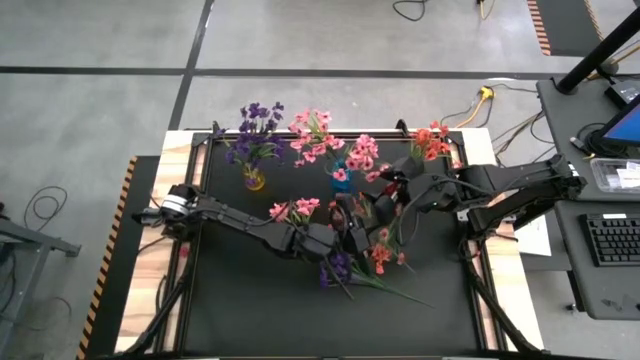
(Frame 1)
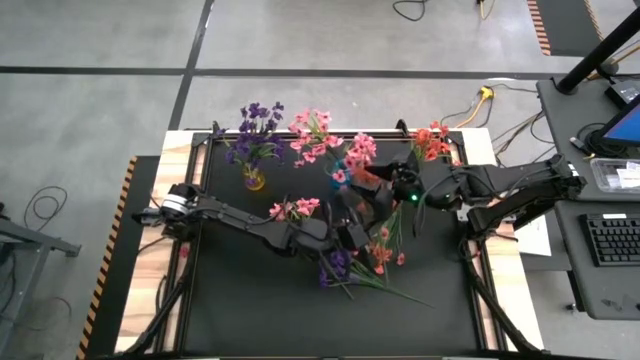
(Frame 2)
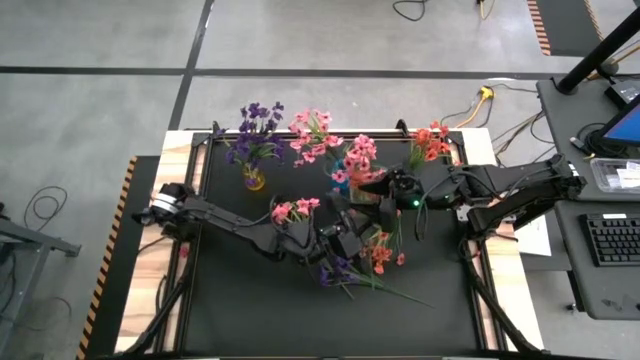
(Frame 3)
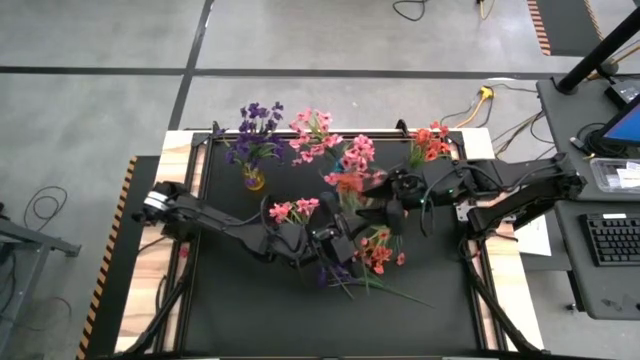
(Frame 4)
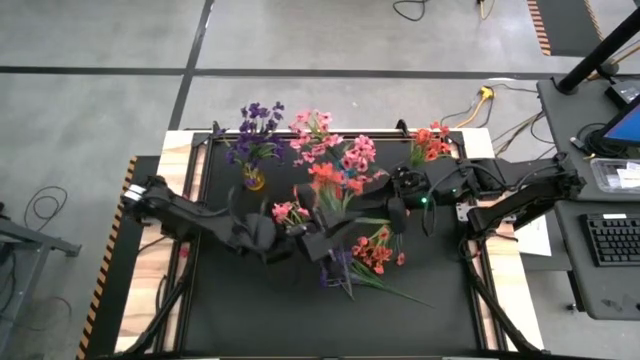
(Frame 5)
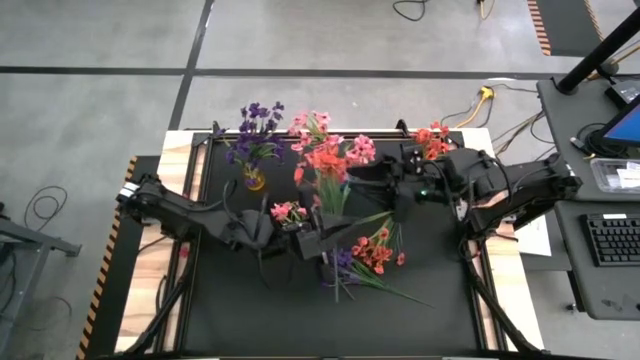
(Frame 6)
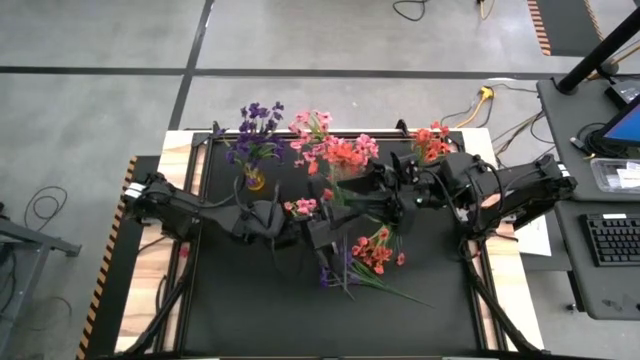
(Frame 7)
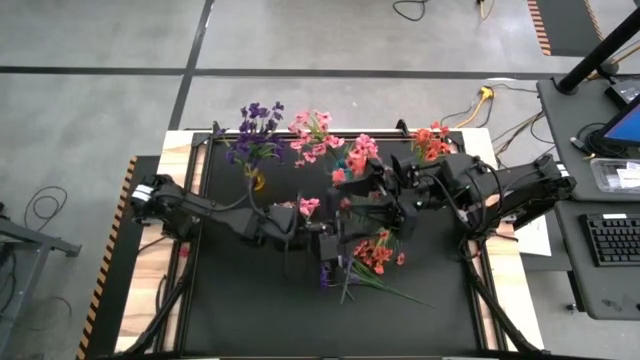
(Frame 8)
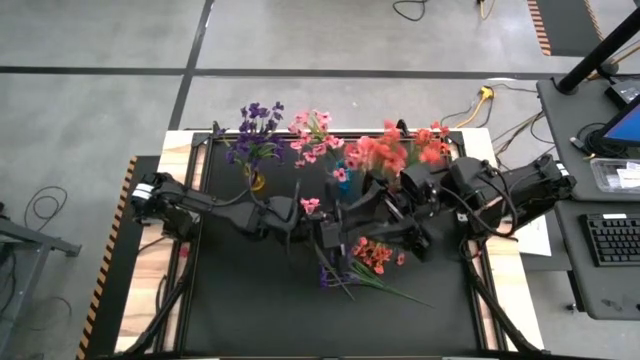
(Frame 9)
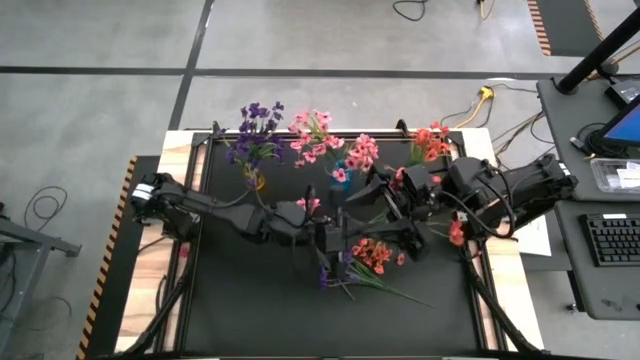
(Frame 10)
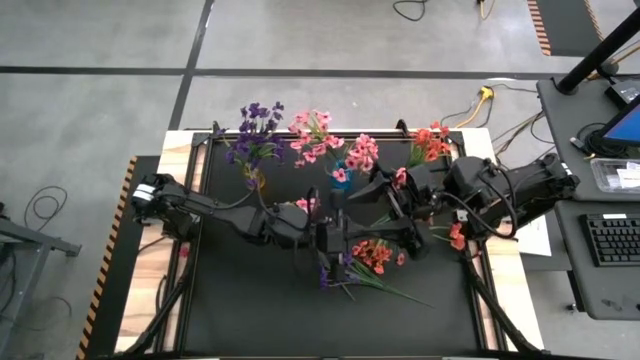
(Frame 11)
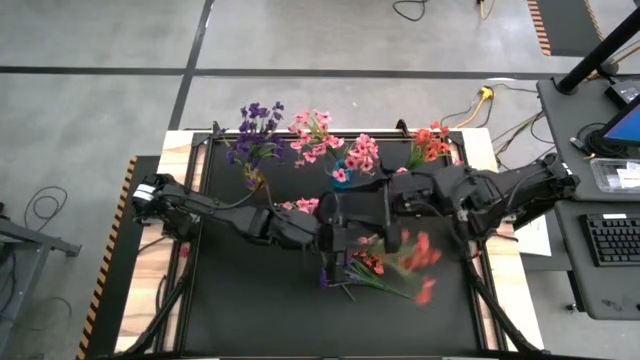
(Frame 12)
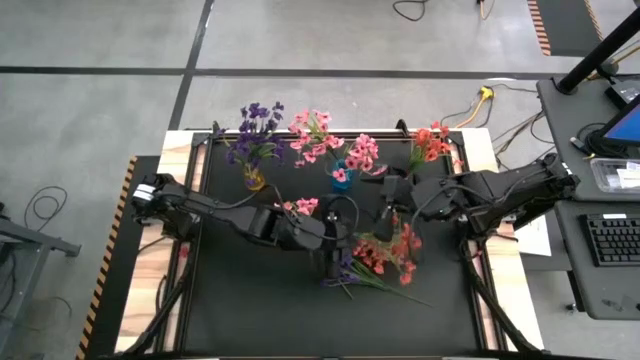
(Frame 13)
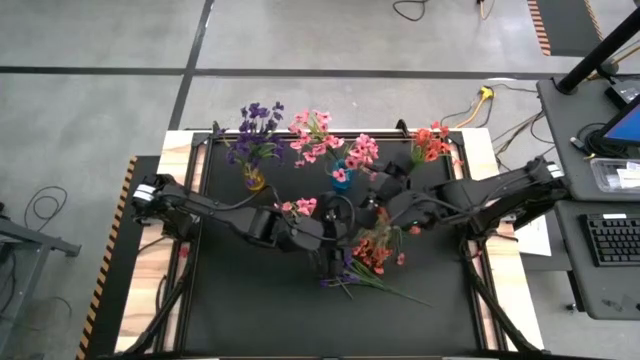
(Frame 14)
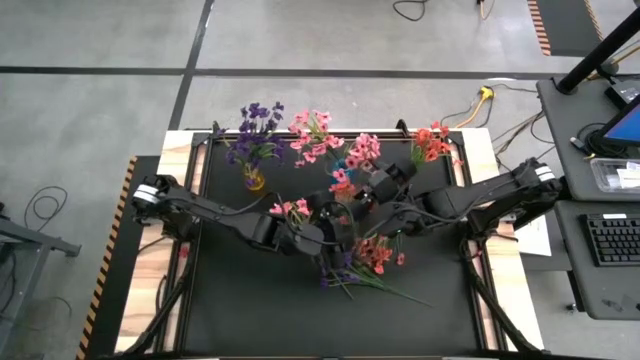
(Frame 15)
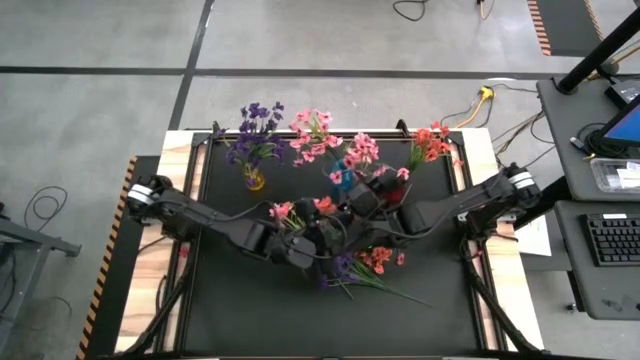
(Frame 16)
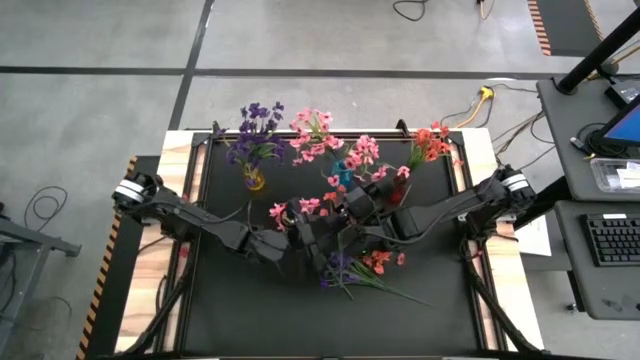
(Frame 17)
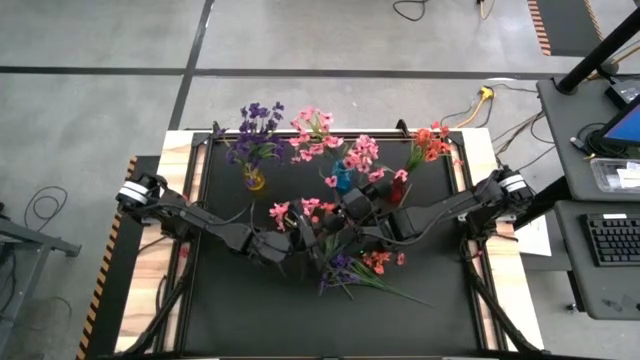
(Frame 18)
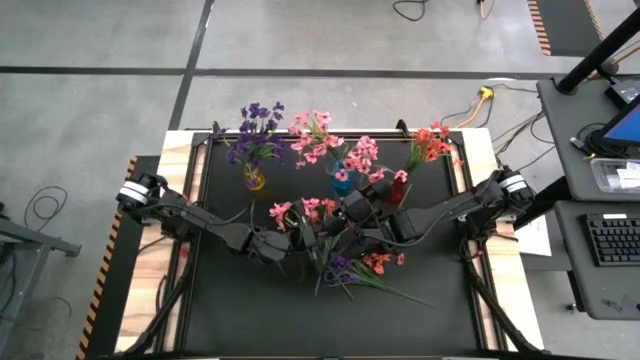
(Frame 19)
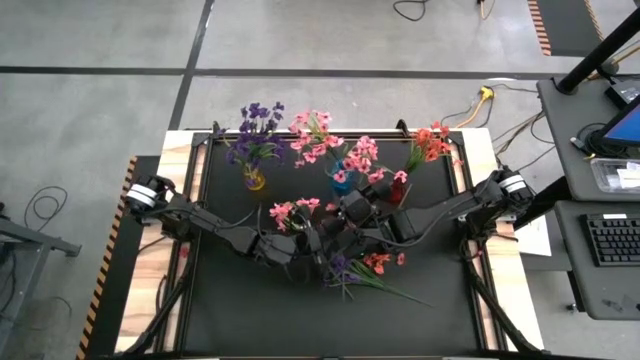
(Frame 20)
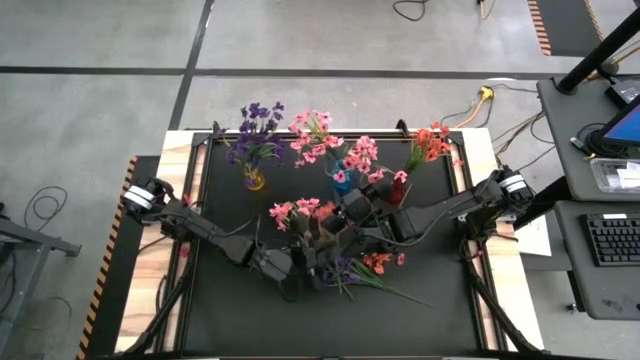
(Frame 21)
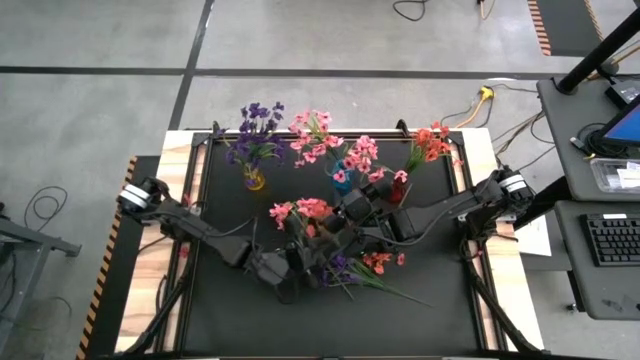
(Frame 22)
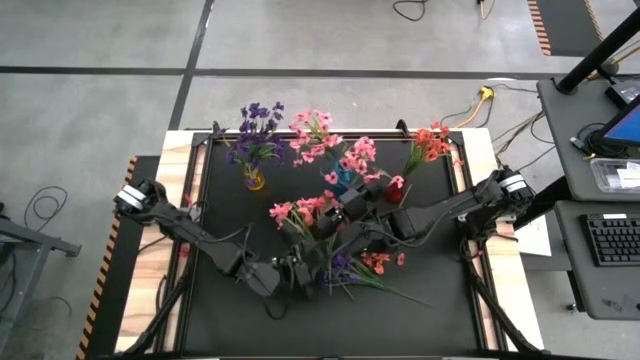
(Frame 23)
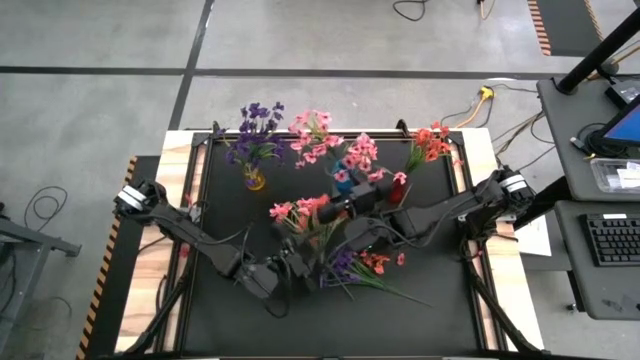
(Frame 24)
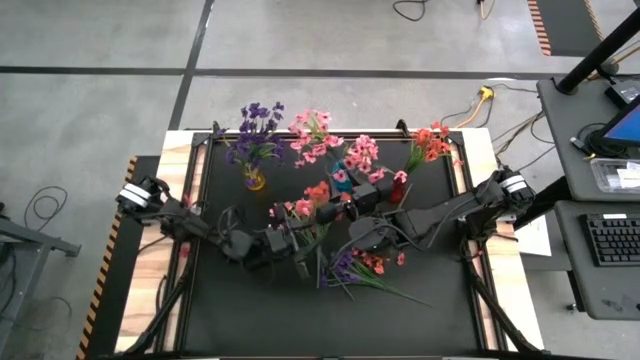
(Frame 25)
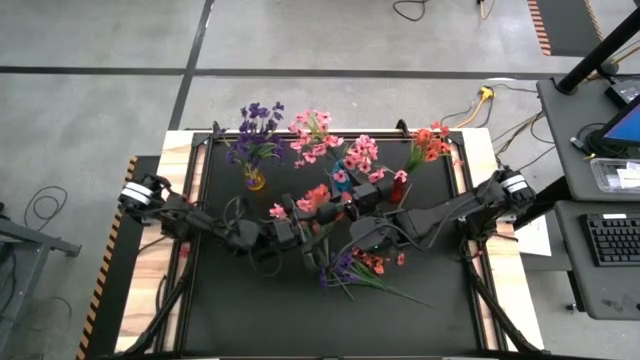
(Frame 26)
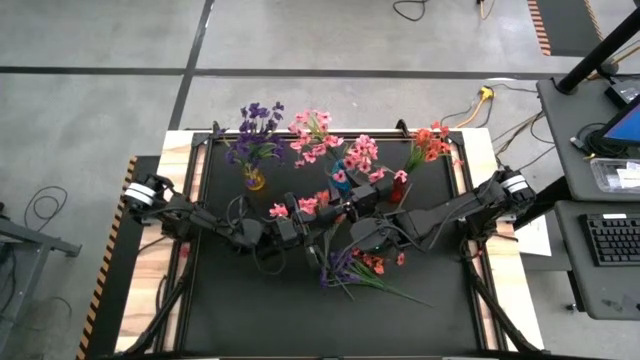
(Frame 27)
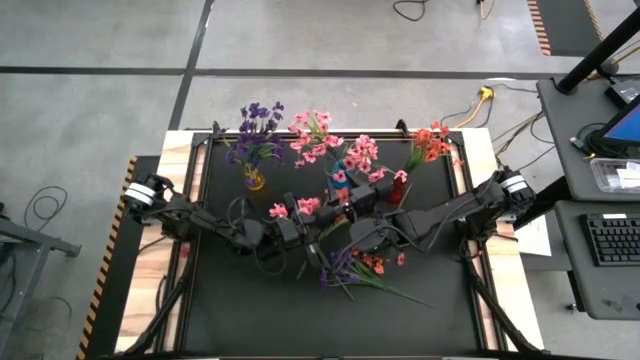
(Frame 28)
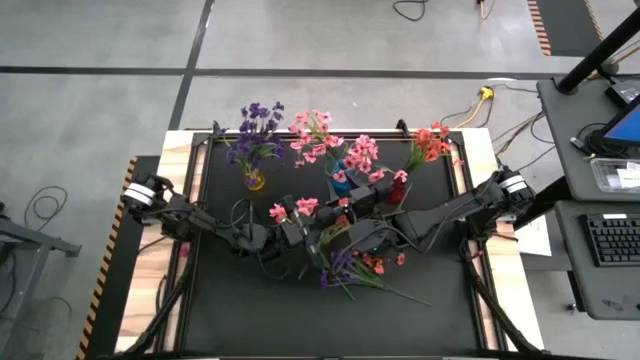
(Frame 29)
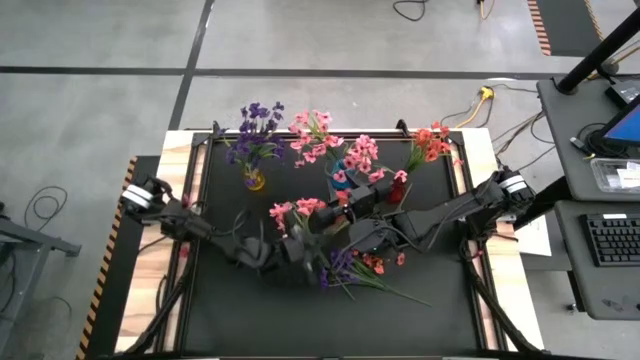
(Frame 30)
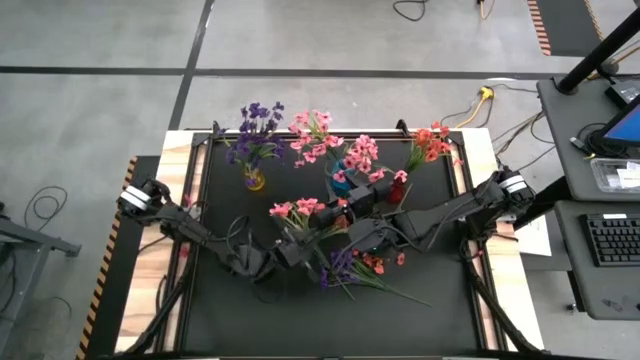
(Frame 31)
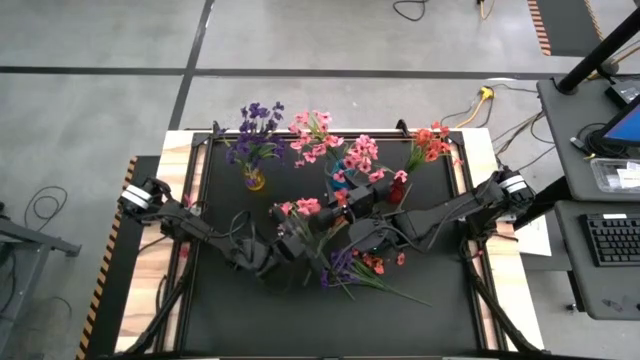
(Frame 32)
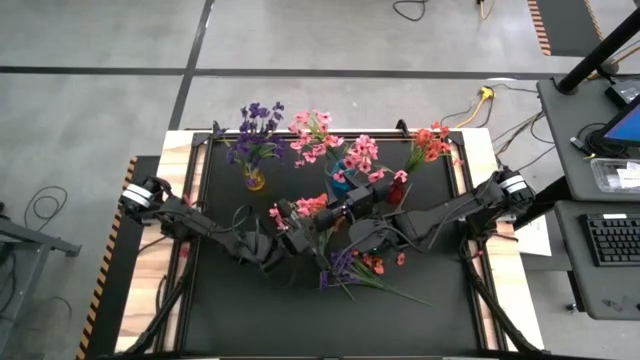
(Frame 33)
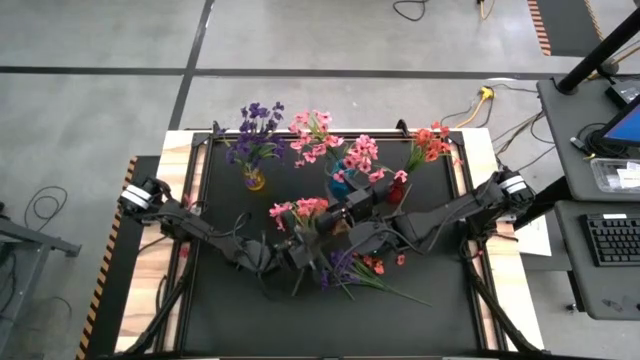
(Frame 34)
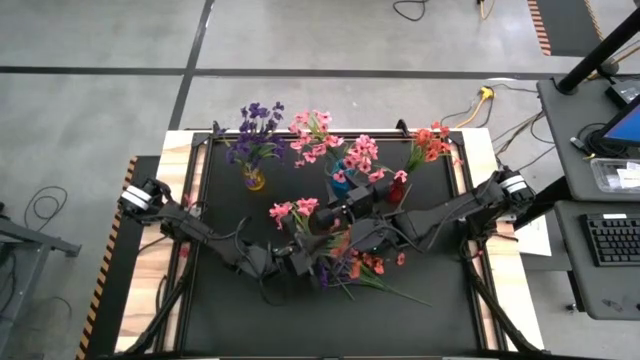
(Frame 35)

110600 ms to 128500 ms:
Task: Sort flowers into vase by color
Put the orange flower into the red vase

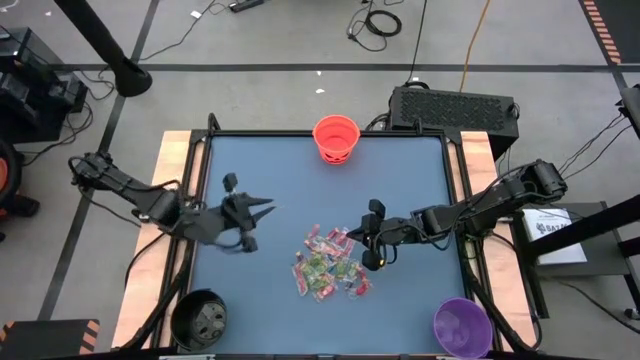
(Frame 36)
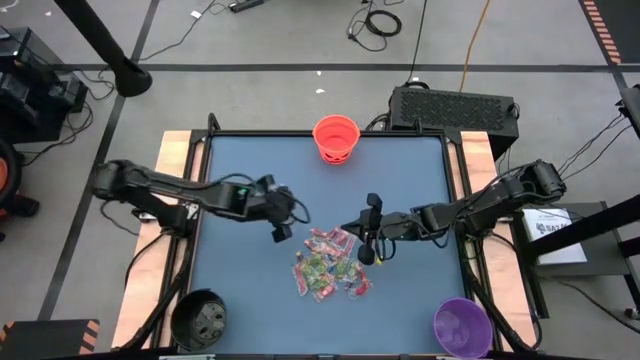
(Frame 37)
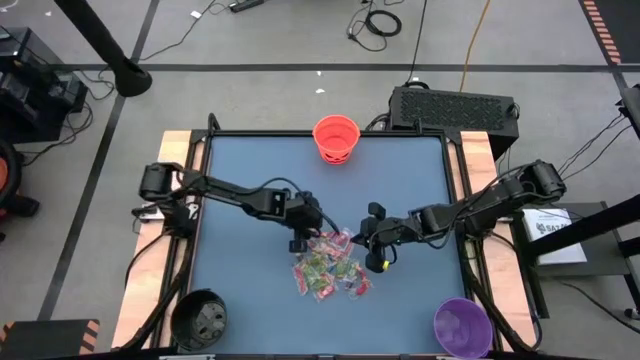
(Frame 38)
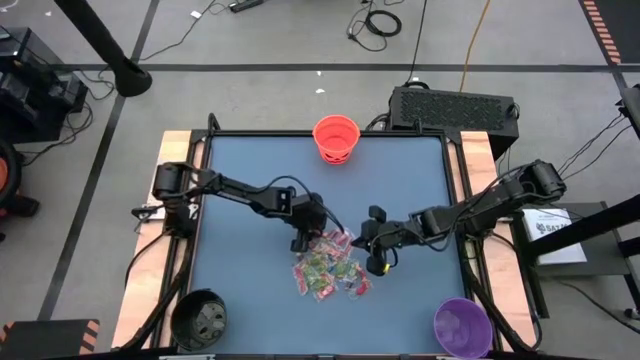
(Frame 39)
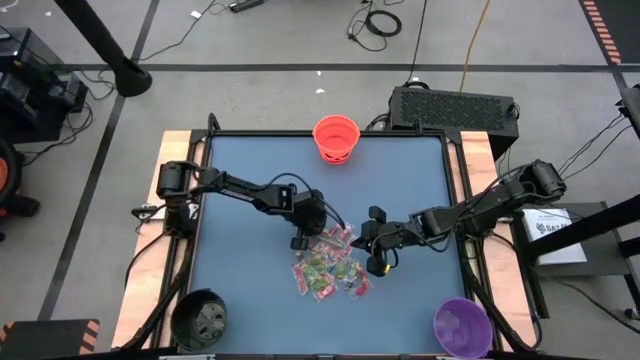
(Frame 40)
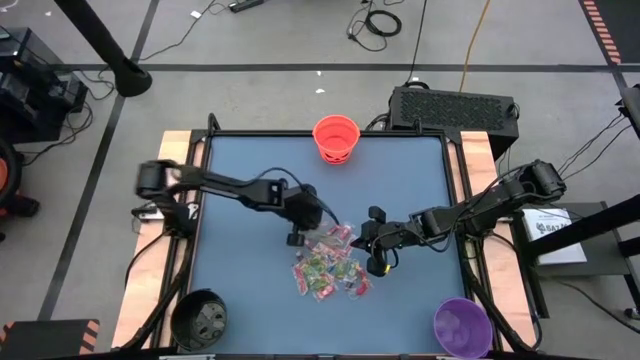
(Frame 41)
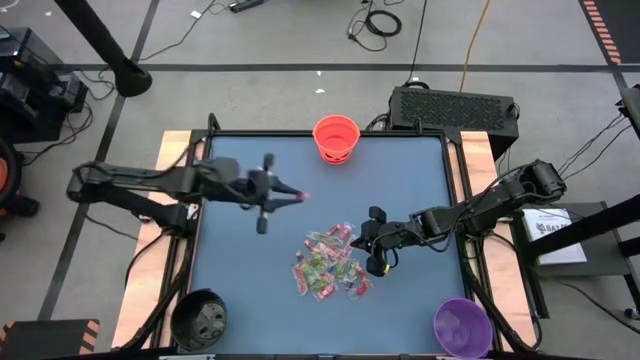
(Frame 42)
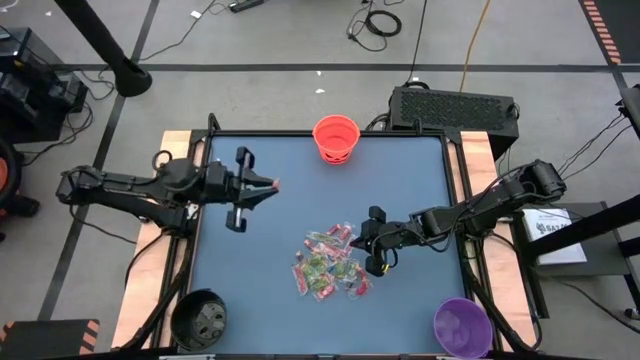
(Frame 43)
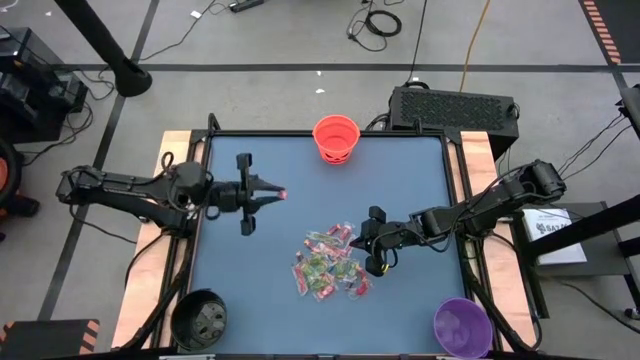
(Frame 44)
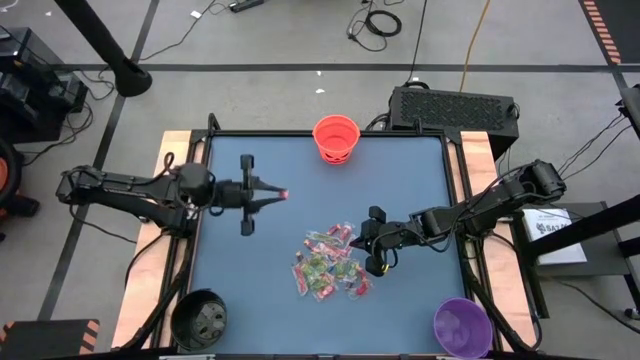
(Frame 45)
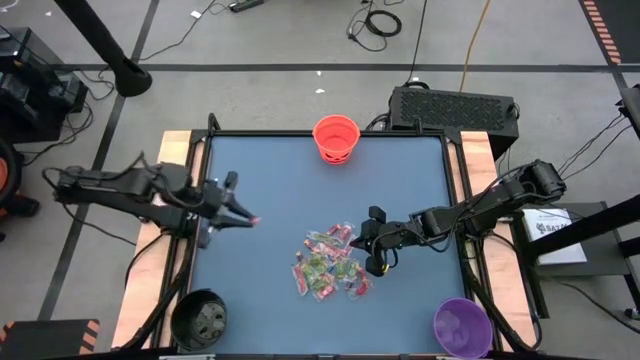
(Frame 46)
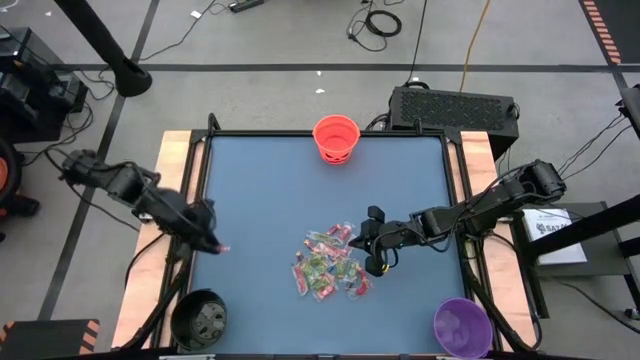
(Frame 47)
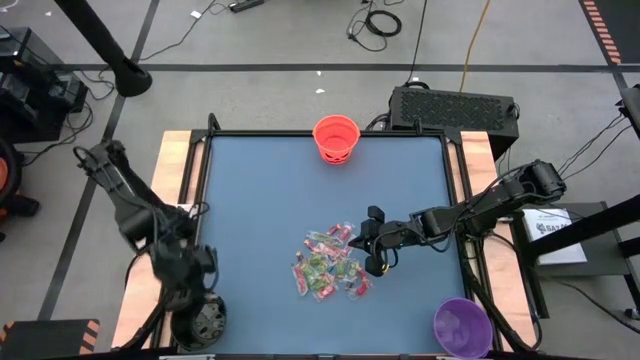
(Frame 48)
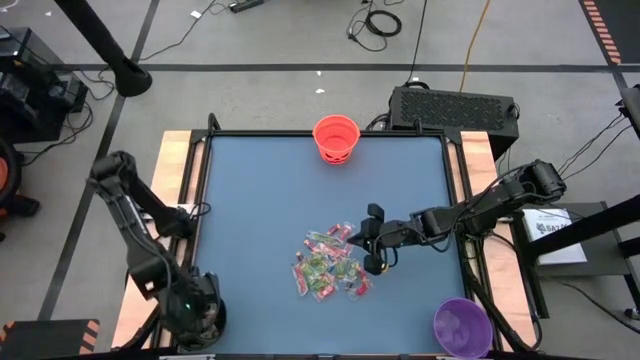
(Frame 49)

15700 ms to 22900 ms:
Task: Sort candy by brand, put in halloween buckets
Put the orange candy into the black bucket
